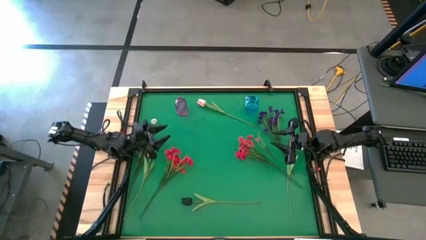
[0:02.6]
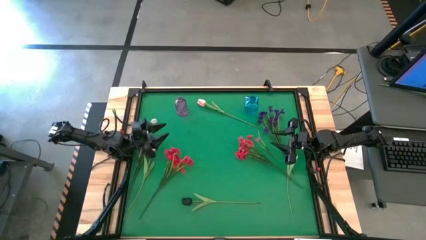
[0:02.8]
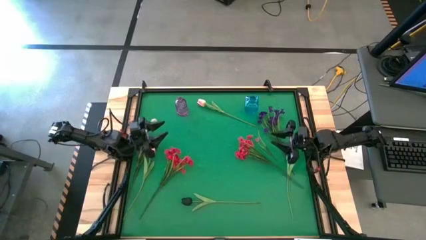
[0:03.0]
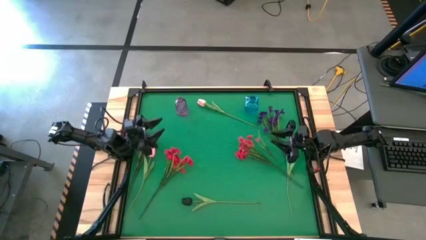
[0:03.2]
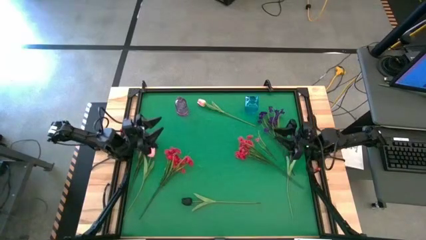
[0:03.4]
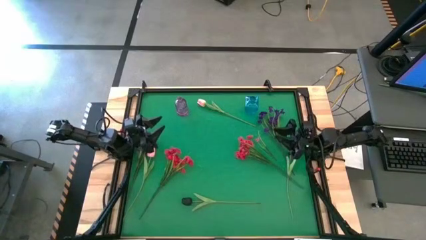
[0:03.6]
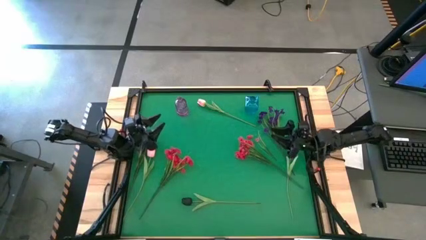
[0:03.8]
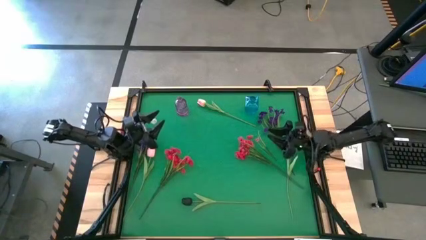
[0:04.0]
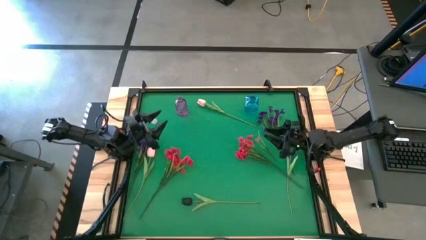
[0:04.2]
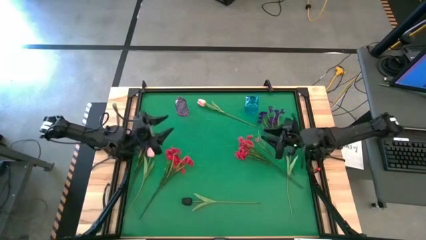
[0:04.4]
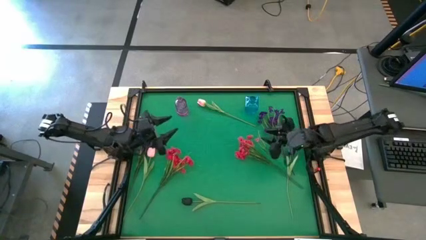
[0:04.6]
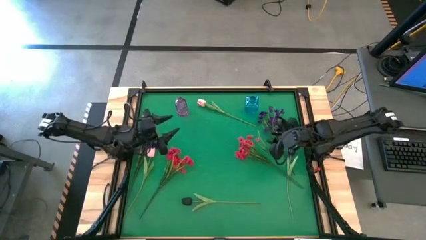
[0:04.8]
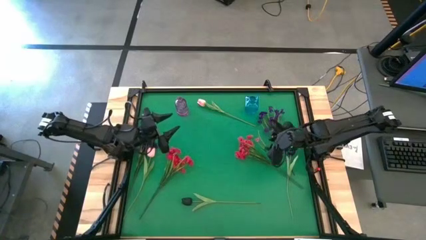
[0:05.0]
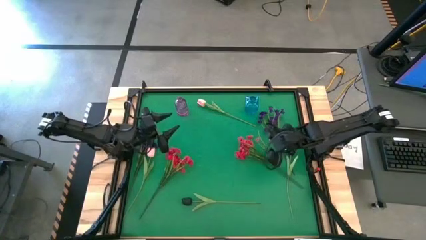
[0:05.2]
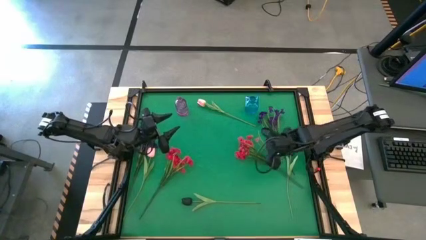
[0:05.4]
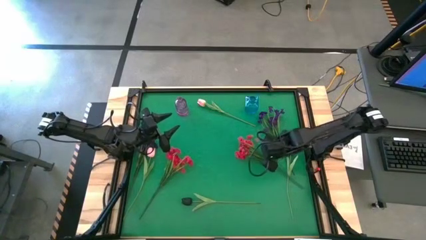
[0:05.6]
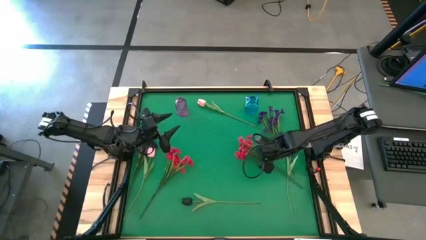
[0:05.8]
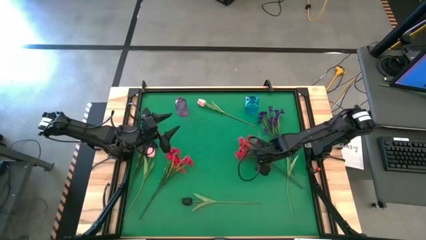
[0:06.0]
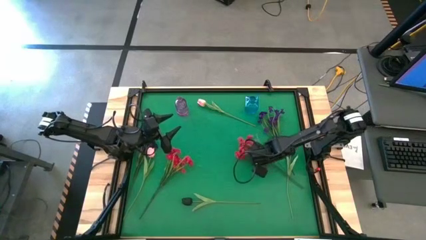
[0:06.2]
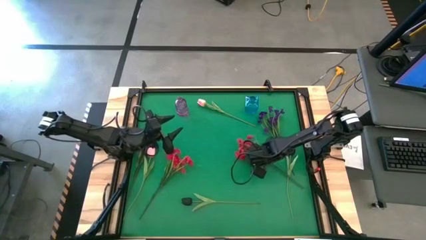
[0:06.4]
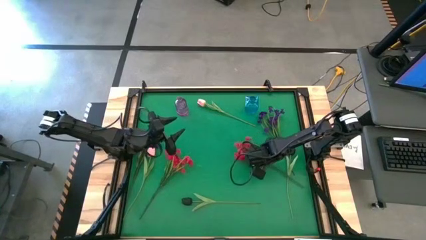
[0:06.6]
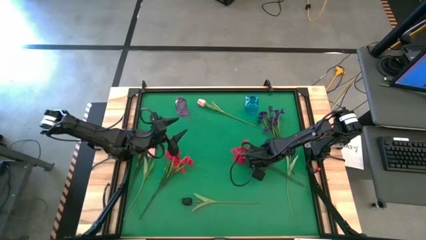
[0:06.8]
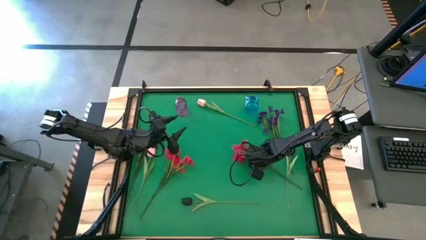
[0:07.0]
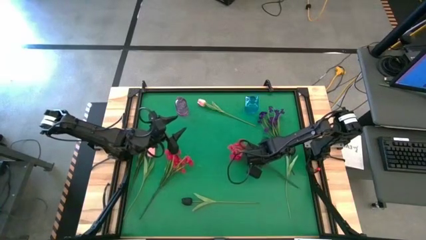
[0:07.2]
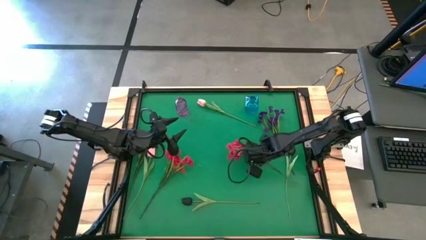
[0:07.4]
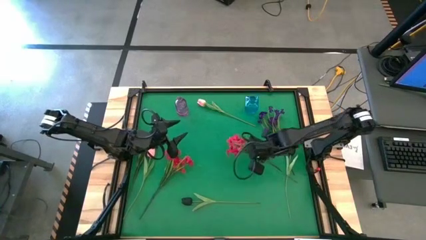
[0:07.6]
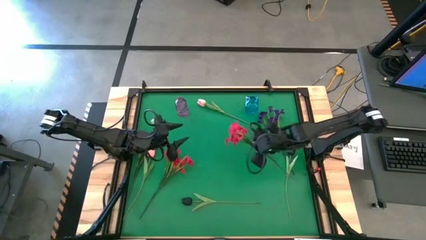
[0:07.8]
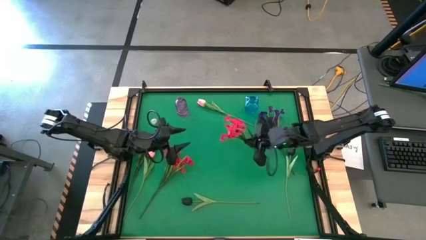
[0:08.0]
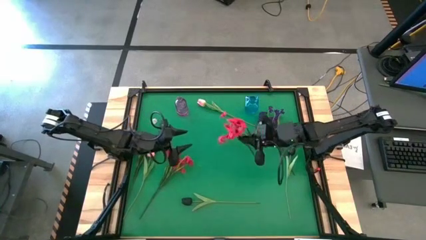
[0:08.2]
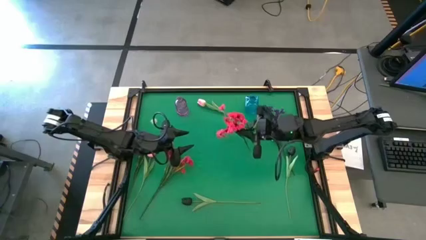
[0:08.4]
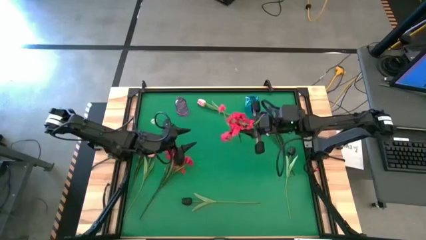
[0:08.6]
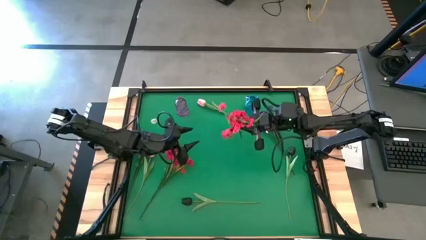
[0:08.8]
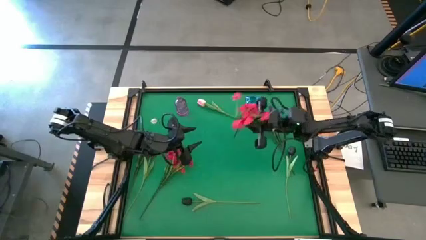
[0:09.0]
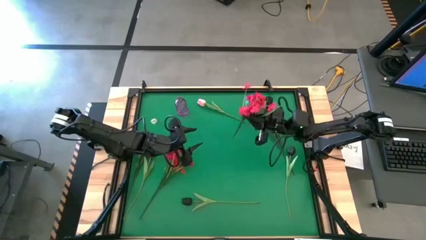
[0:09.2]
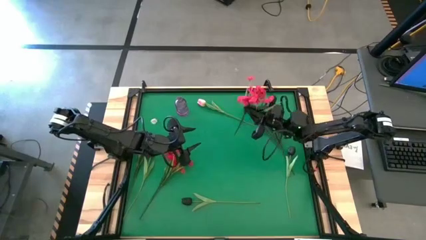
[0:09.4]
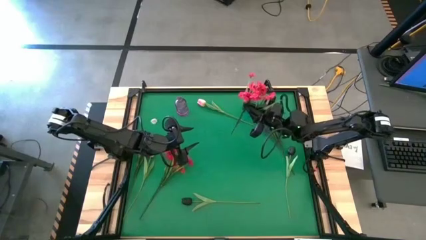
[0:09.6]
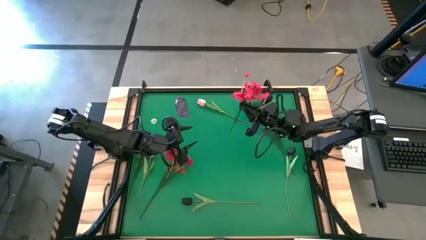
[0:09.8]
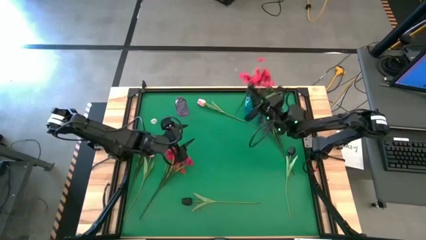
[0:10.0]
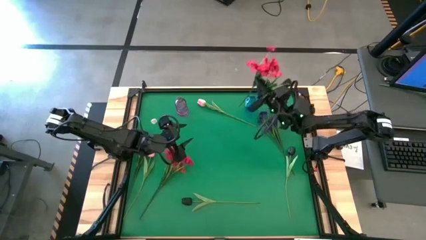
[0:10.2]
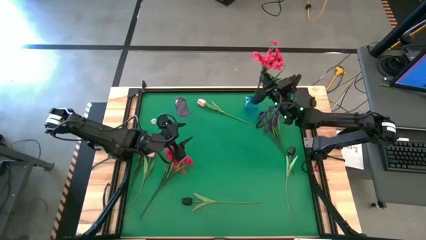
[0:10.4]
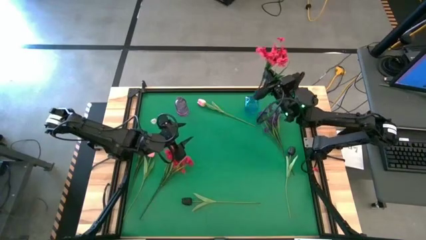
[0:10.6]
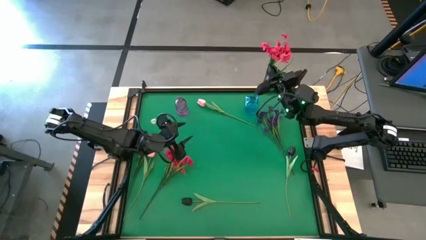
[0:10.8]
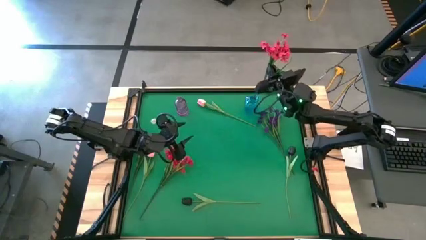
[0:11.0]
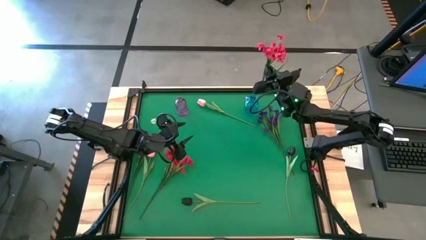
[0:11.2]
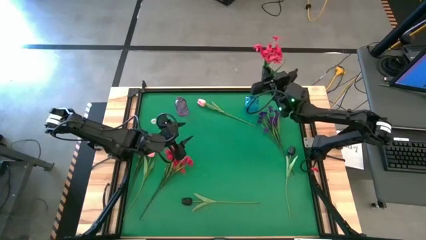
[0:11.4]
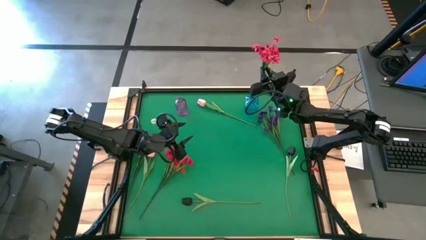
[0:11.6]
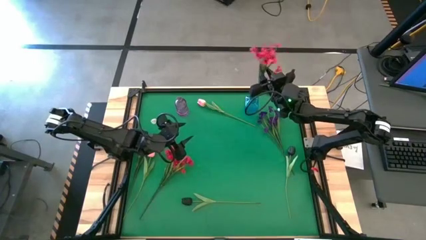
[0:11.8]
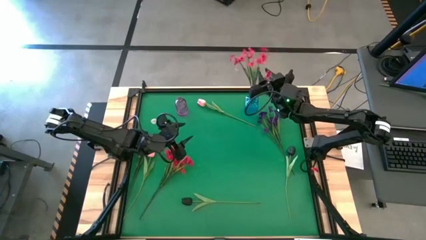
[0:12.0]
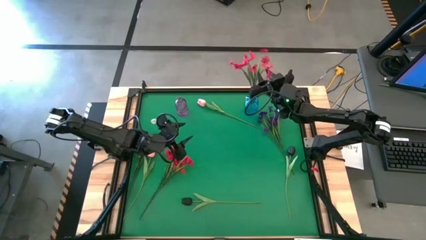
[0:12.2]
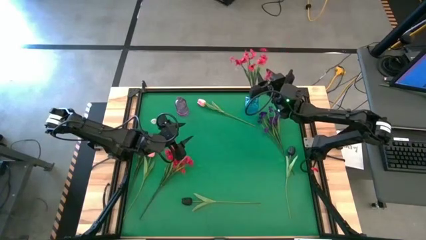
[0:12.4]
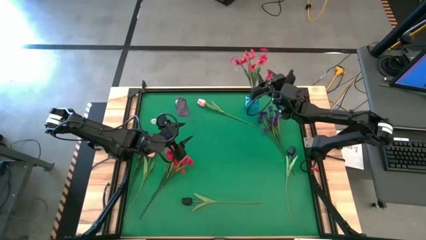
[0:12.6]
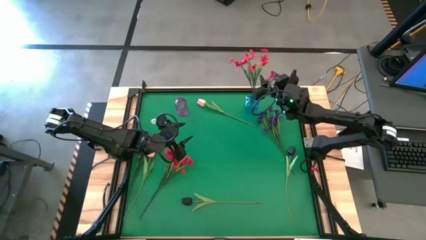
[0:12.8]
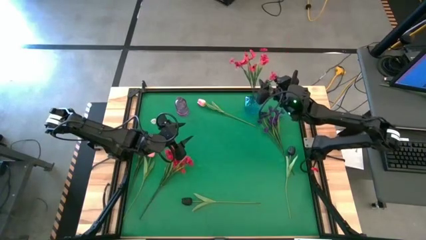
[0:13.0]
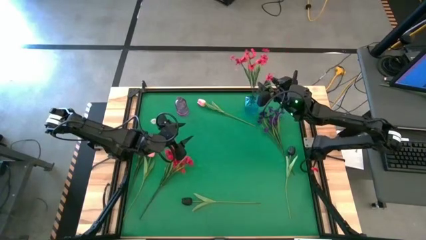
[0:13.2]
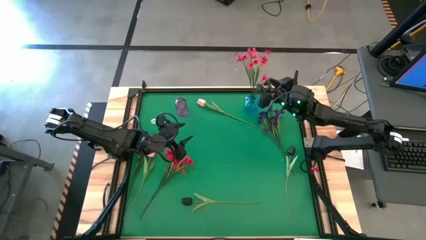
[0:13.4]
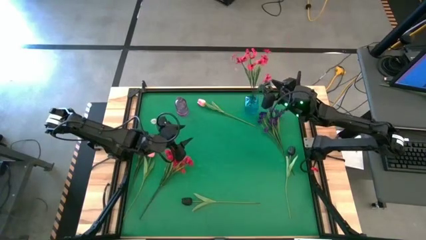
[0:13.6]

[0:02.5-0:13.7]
Task: Sort flowers into vase by color
Put the right red flowers into the blue vase
